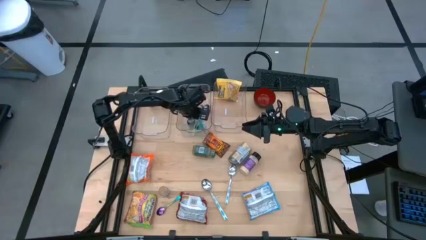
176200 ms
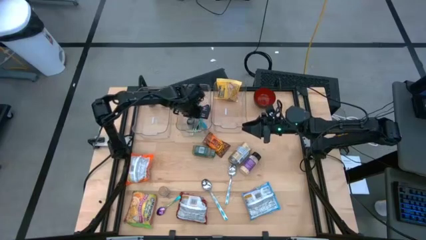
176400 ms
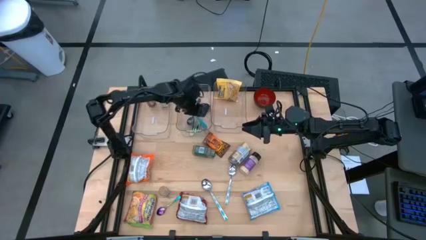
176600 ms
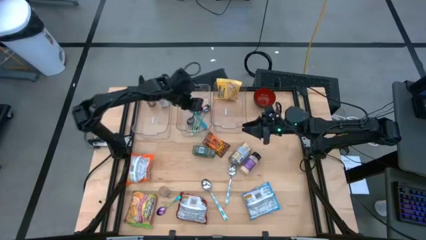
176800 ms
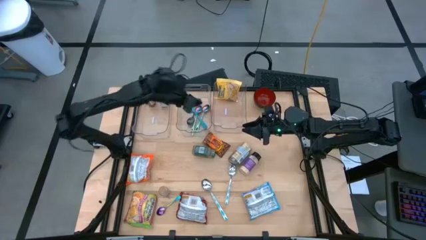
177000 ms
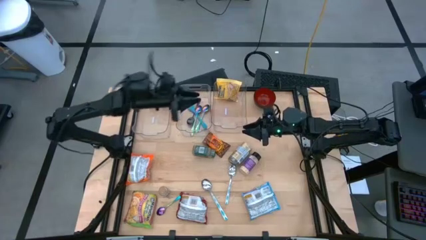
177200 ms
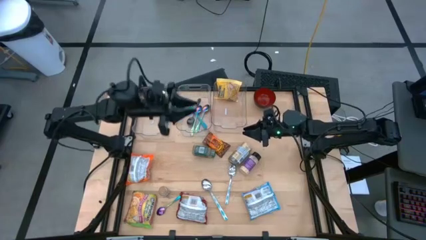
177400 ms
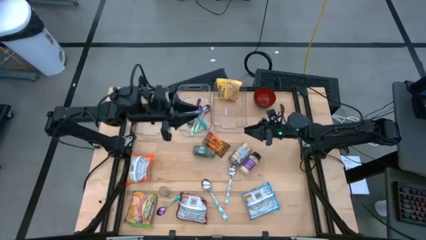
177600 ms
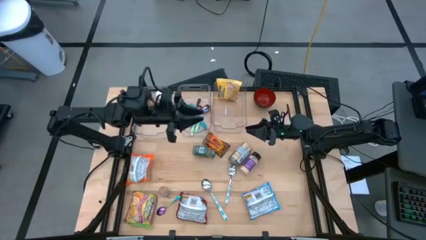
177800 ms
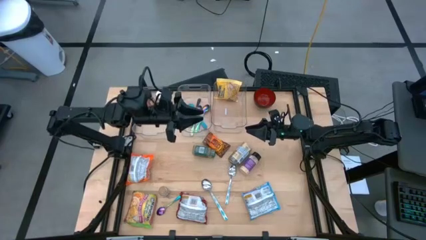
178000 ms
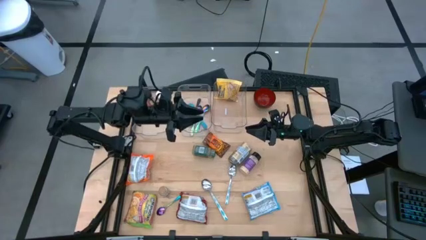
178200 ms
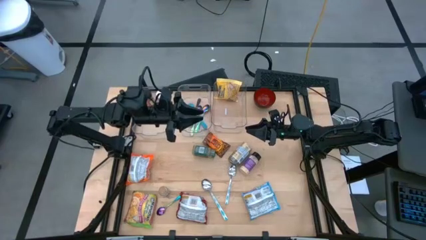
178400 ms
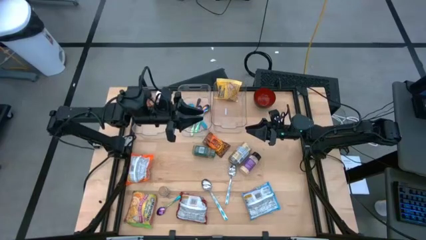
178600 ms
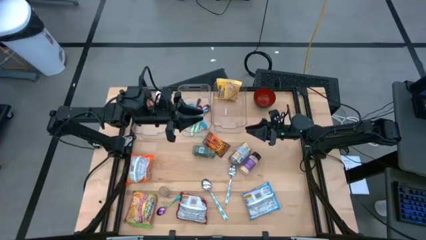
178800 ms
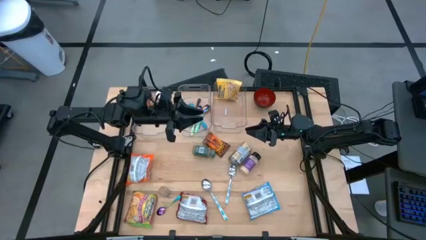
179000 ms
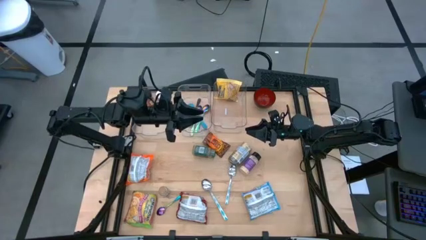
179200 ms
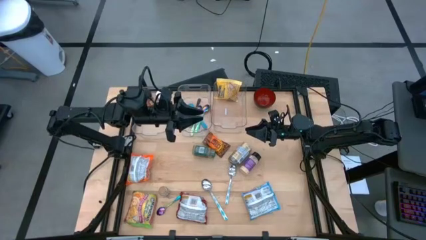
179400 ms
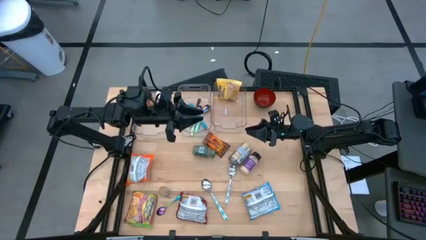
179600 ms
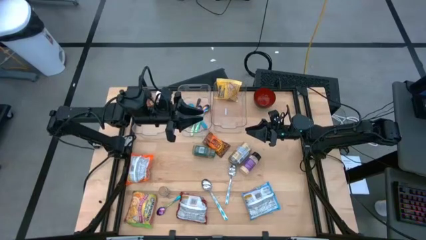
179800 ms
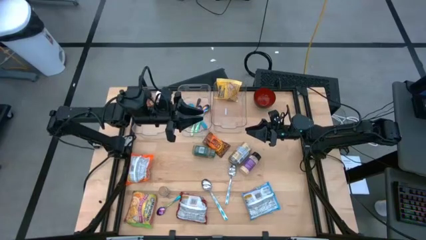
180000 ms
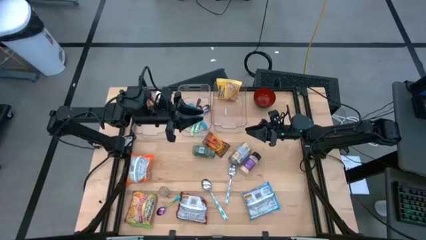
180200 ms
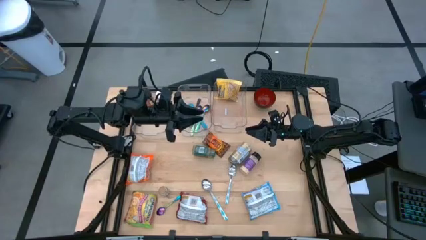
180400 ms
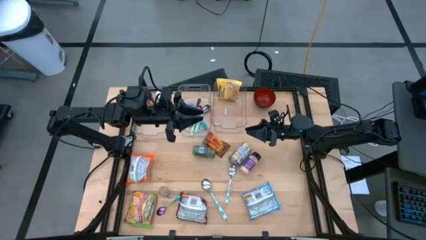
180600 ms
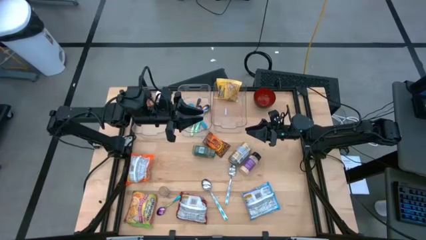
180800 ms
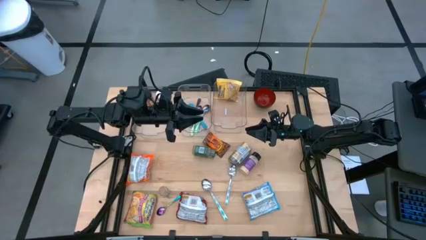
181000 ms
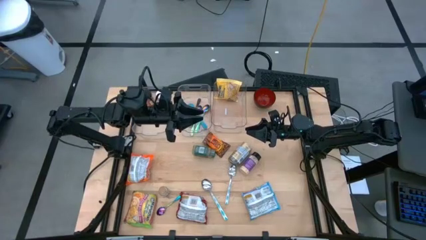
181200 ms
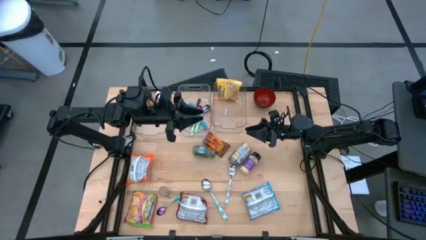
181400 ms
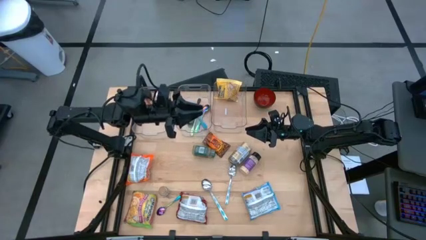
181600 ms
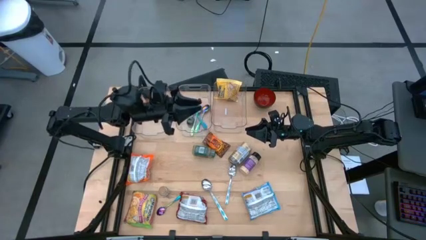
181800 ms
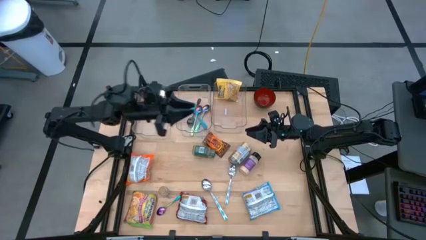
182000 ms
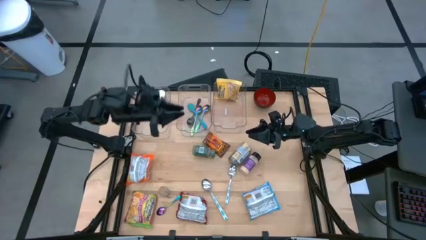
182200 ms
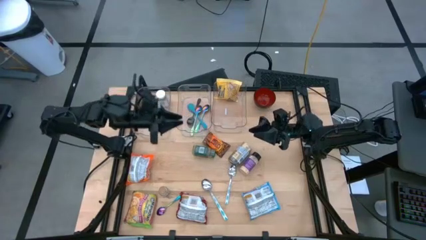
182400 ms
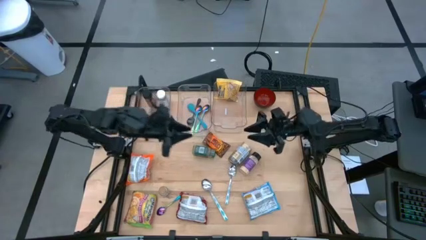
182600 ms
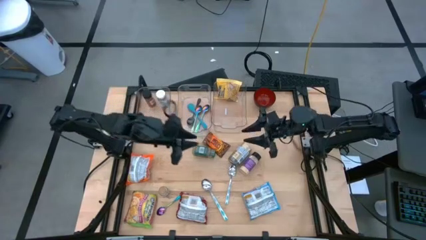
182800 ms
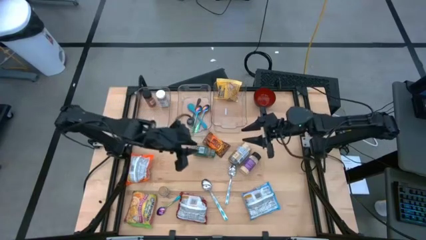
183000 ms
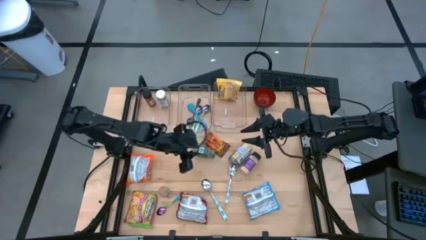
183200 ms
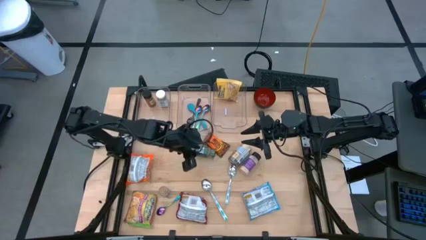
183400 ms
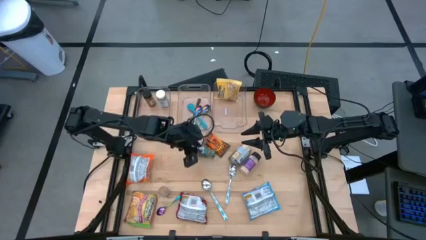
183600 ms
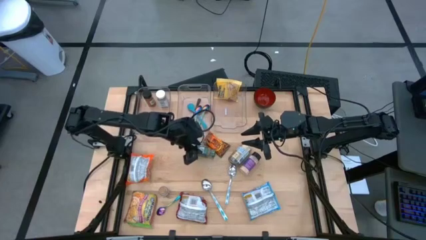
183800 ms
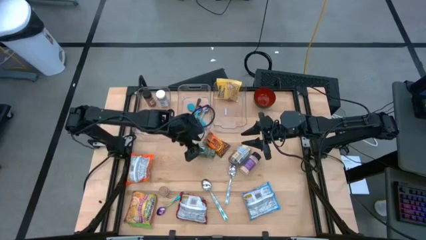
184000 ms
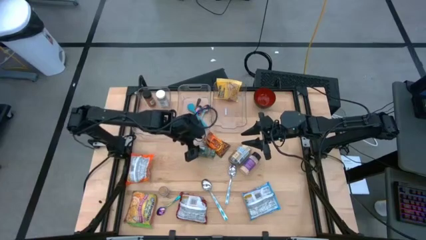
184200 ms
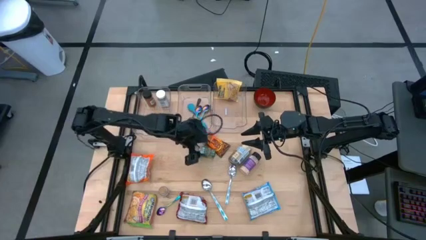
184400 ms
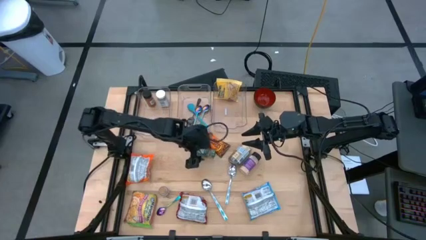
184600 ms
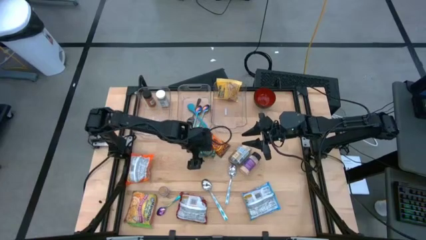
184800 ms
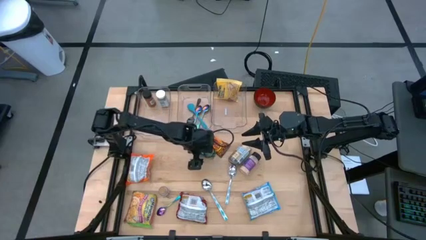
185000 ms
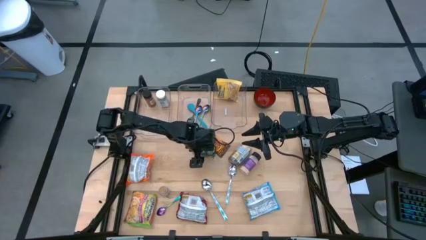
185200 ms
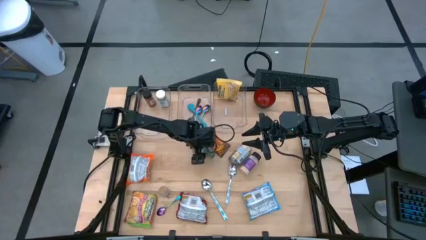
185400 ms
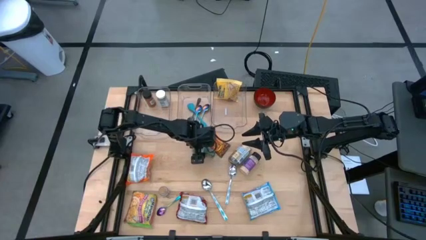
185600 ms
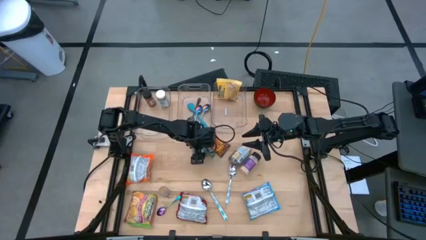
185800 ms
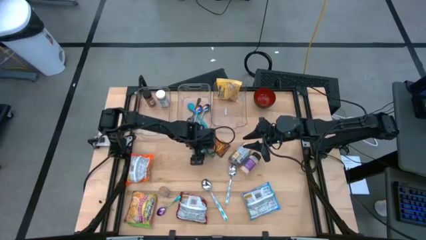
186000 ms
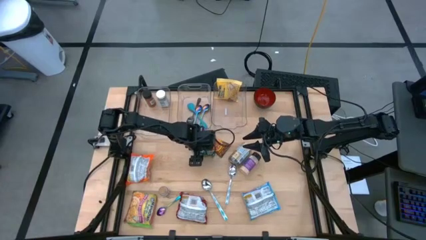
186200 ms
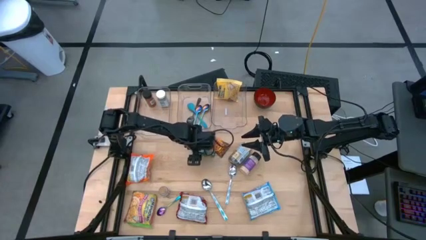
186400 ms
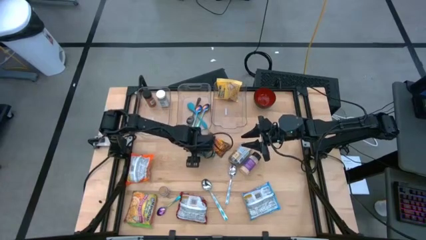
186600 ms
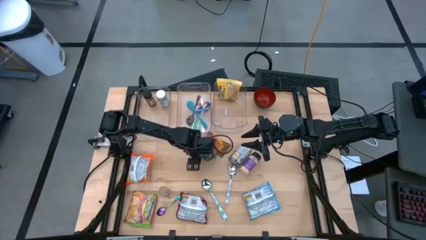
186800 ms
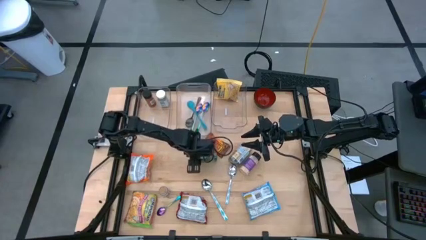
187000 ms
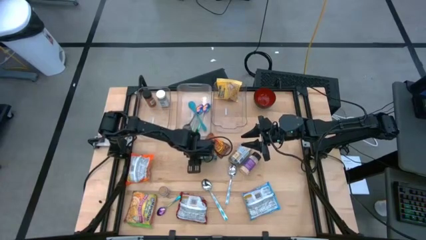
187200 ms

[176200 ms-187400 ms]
Task: Pick & Place Food Item
Put the green spice bottle into the left transparent bin

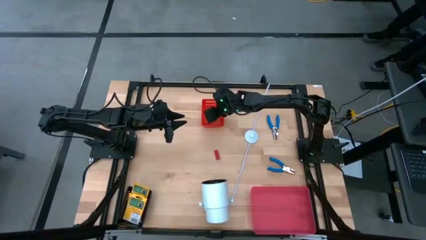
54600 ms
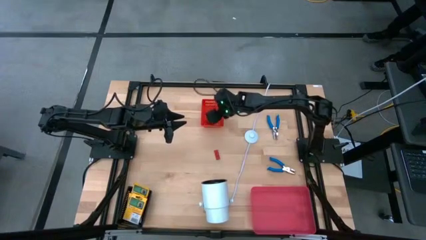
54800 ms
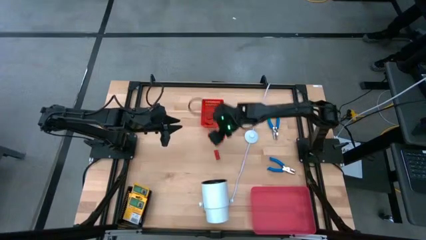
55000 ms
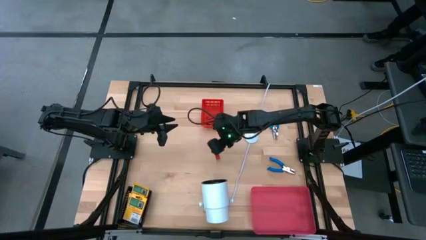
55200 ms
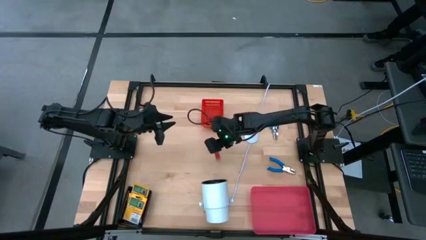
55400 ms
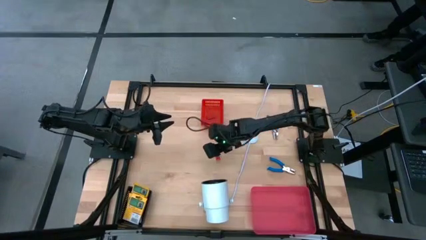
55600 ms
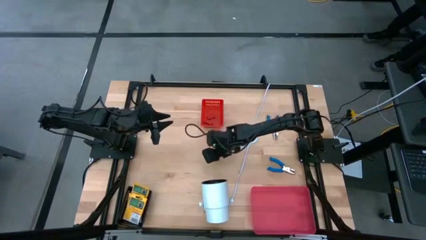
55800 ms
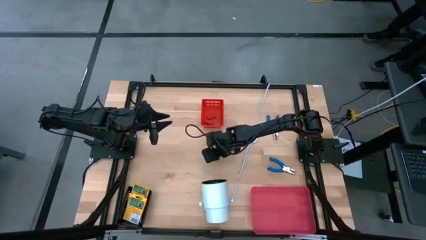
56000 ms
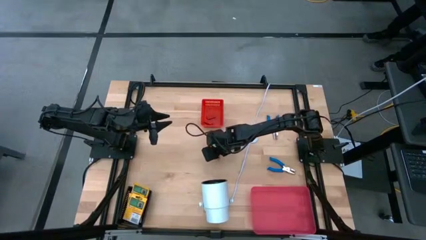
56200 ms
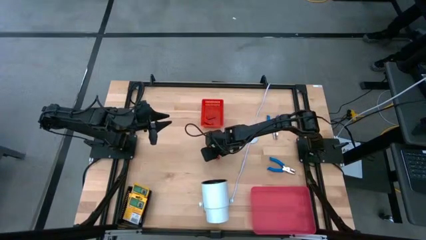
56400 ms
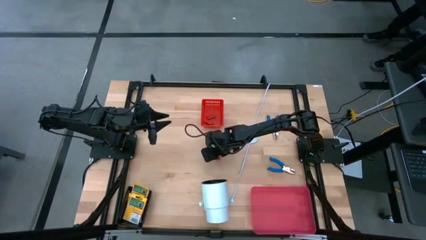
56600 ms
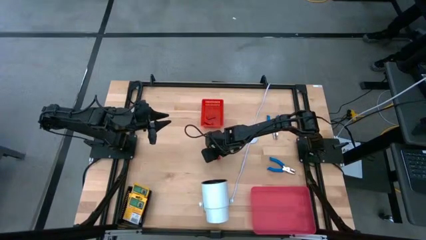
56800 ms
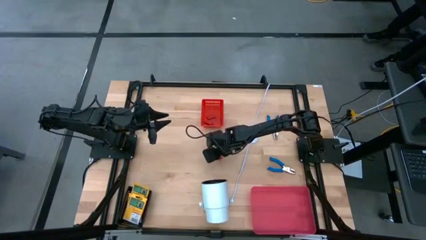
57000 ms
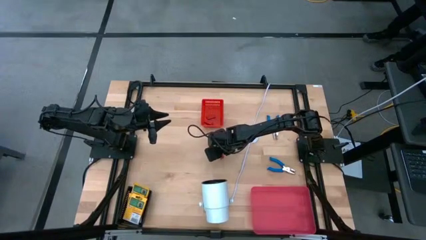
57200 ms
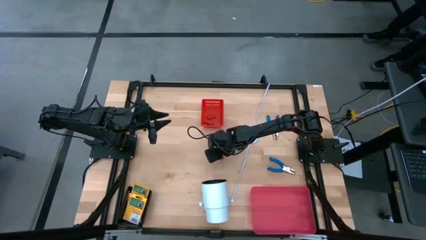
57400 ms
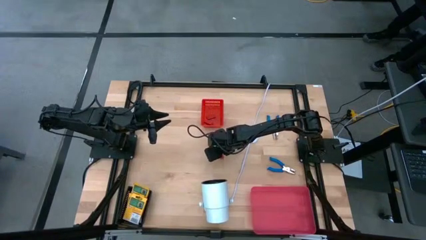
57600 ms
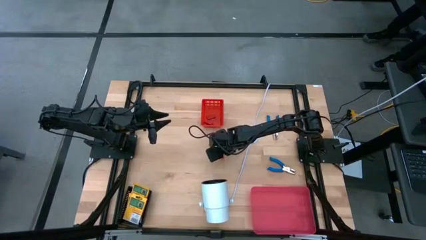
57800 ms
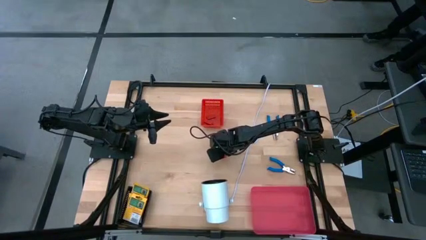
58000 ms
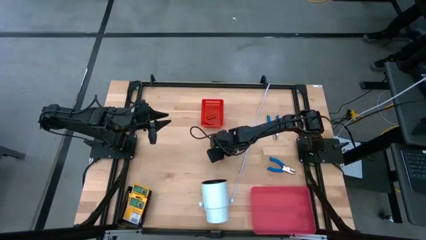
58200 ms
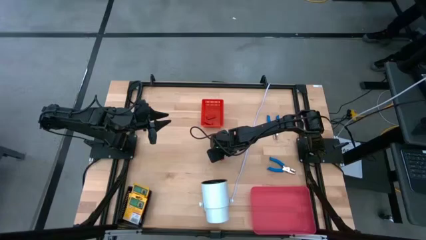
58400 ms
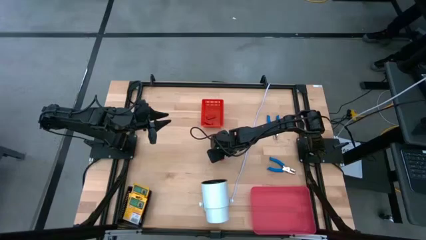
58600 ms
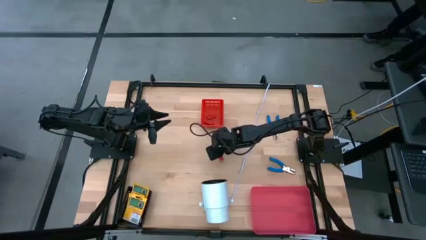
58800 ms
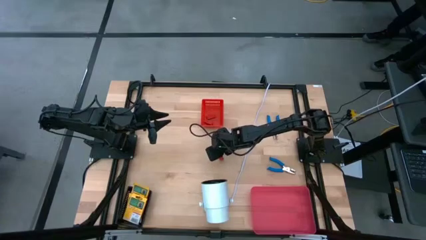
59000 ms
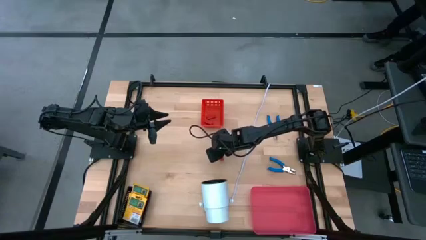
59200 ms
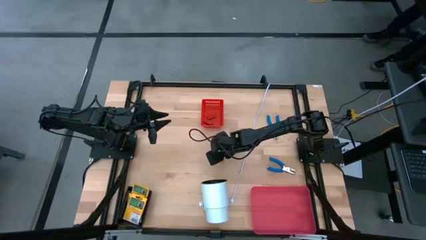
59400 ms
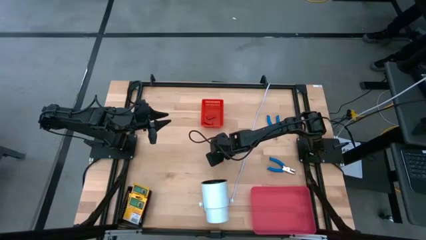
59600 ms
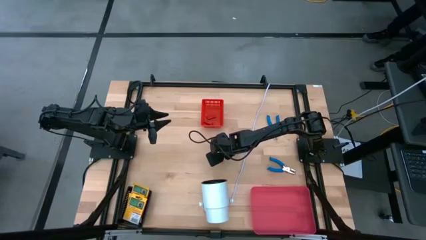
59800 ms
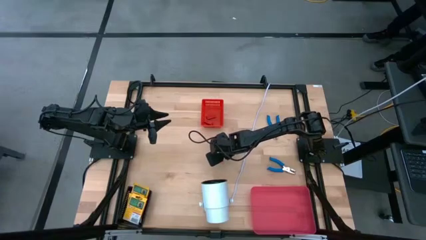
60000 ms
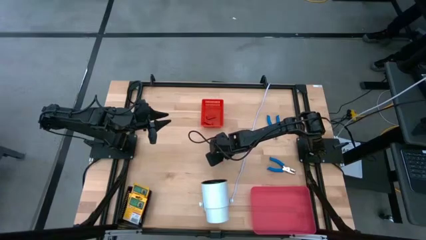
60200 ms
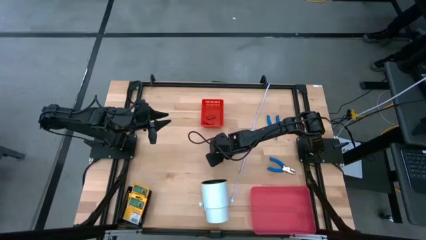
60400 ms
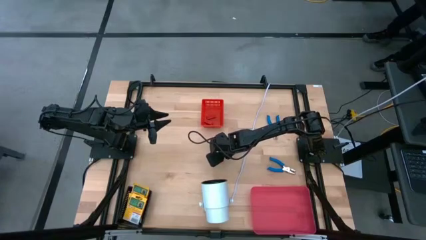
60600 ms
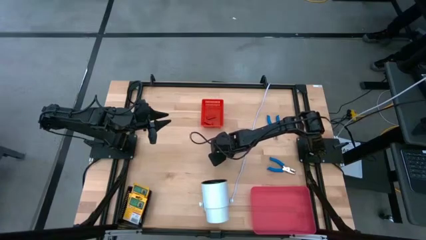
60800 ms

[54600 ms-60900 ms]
Task: Pick & Place School Supplies
Put the red eraser into the red bin

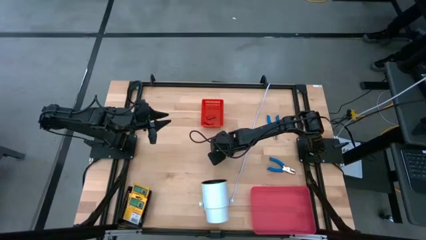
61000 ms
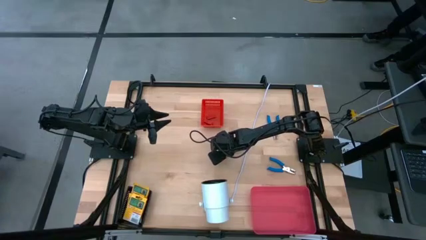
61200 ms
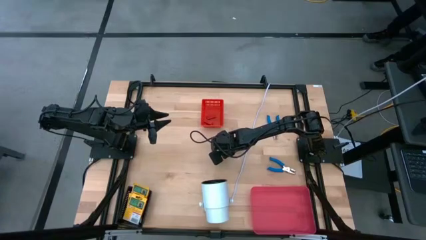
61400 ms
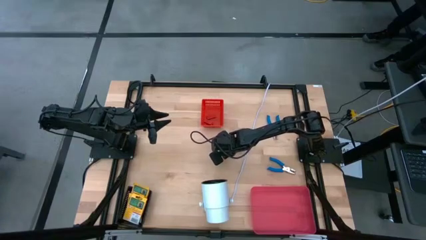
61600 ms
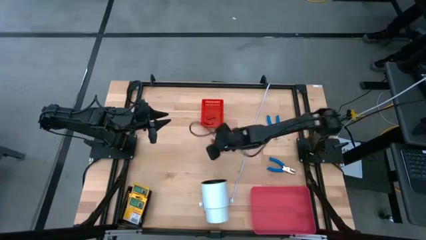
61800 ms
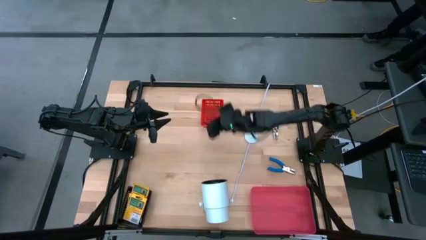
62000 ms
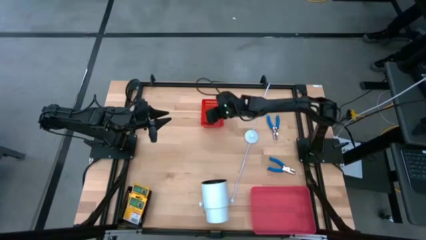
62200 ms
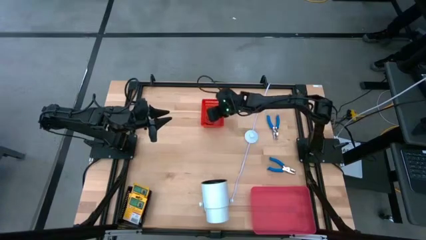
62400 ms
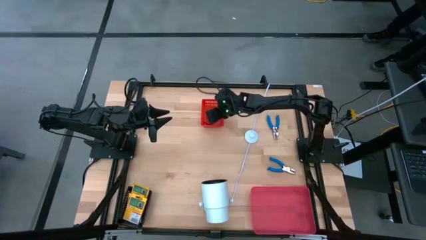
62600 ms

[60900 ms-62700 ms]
Put the red eraser into the red bin
